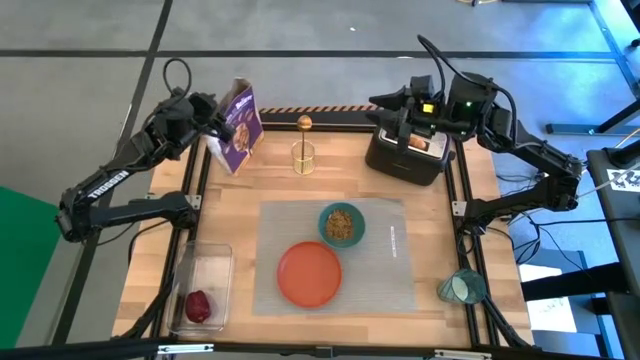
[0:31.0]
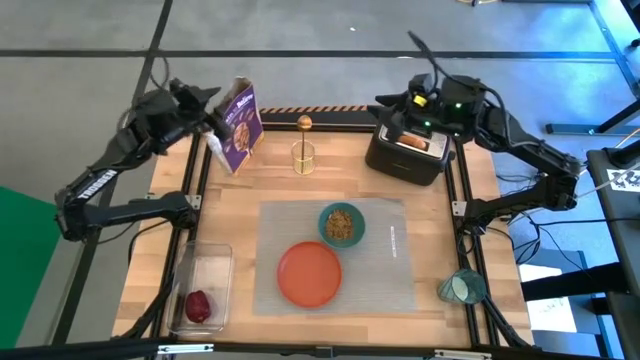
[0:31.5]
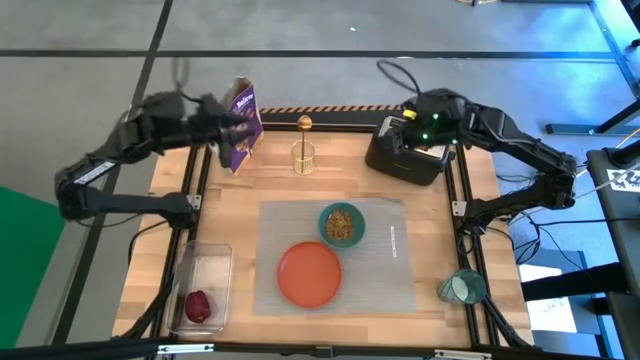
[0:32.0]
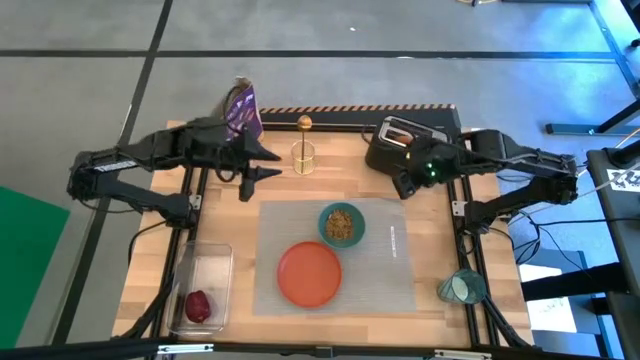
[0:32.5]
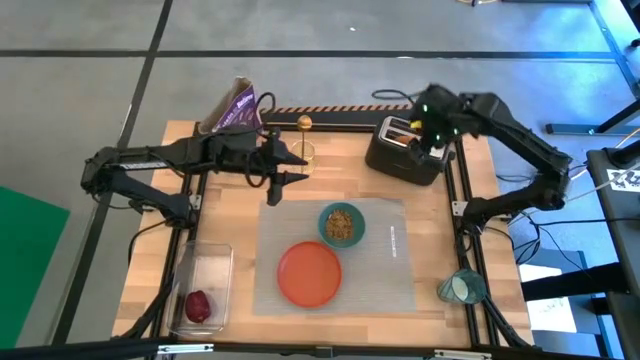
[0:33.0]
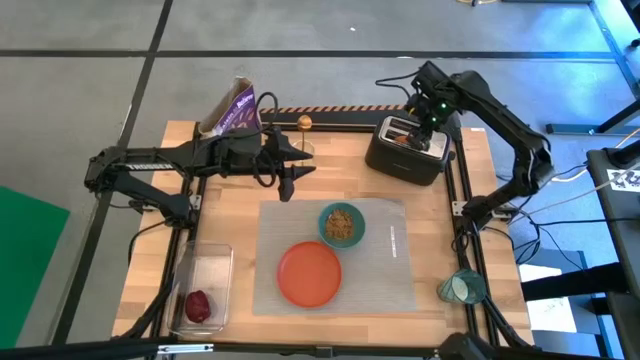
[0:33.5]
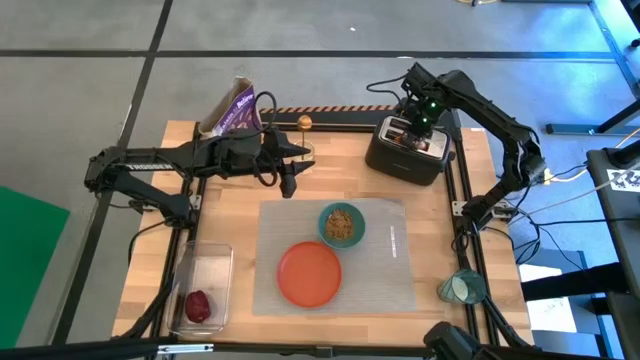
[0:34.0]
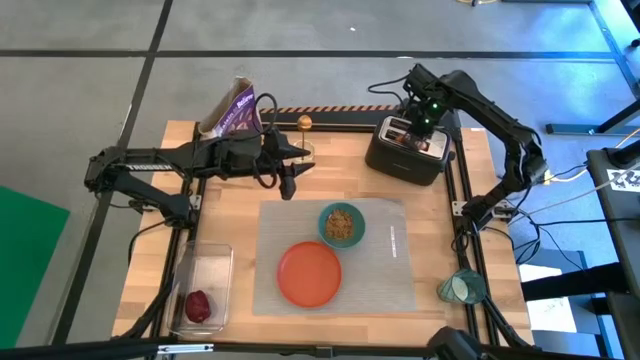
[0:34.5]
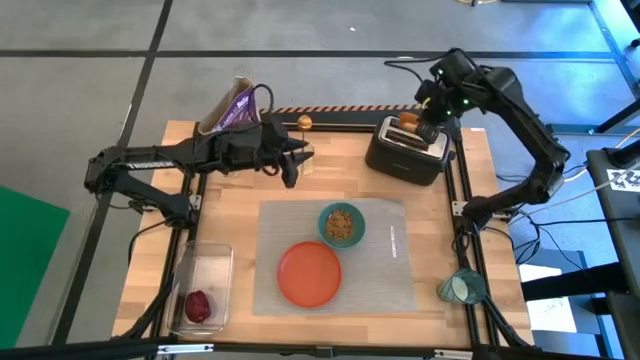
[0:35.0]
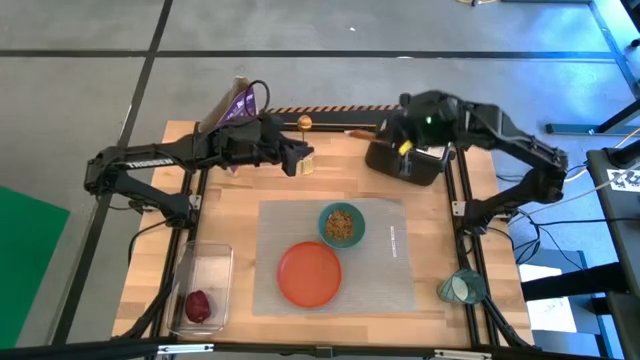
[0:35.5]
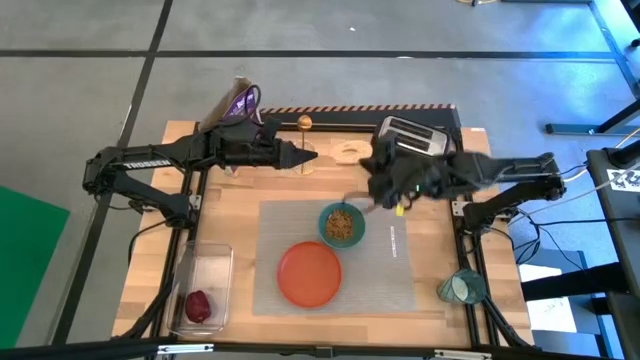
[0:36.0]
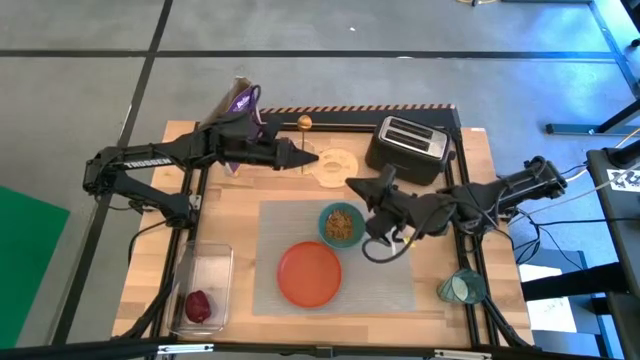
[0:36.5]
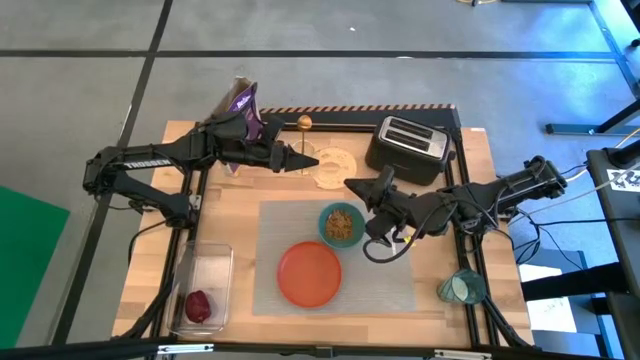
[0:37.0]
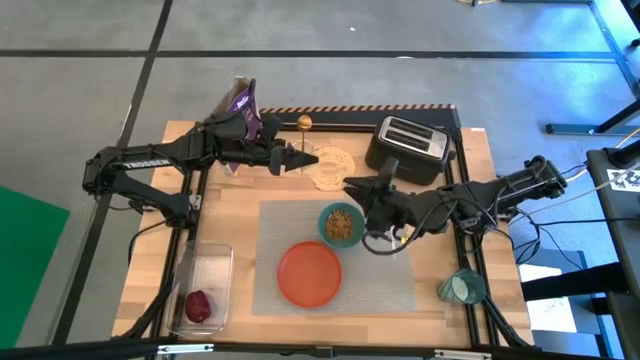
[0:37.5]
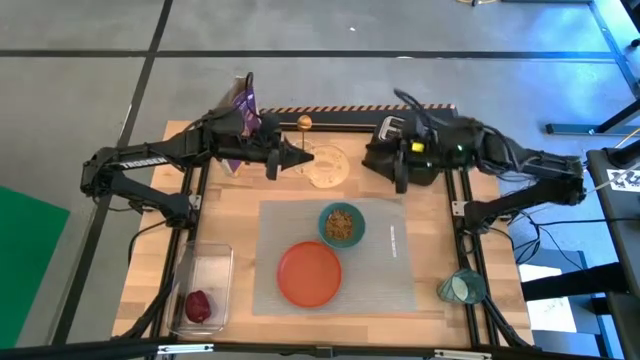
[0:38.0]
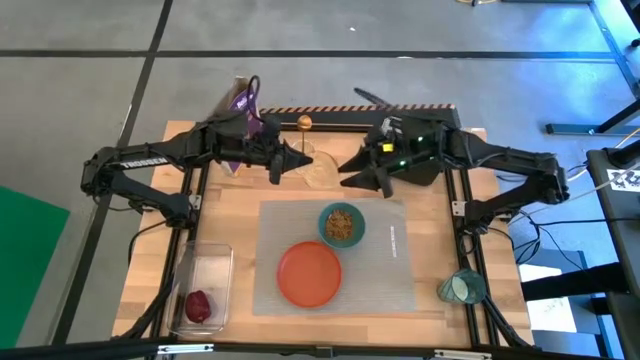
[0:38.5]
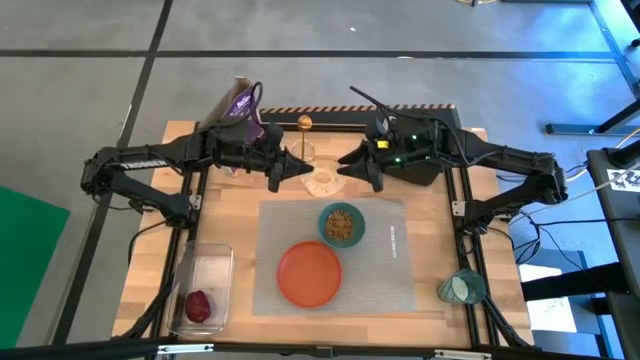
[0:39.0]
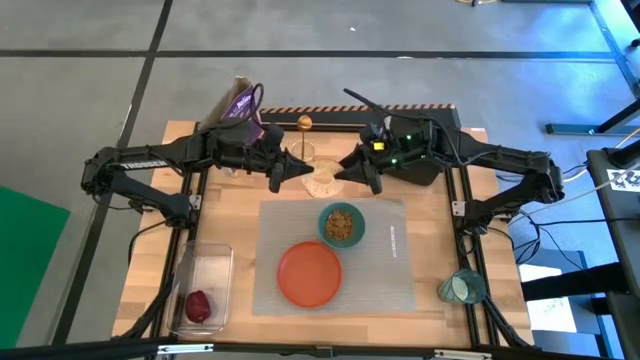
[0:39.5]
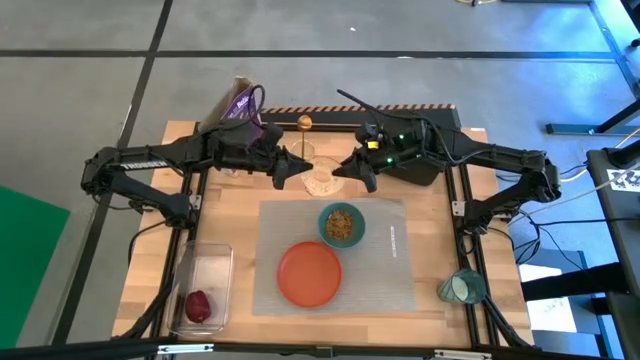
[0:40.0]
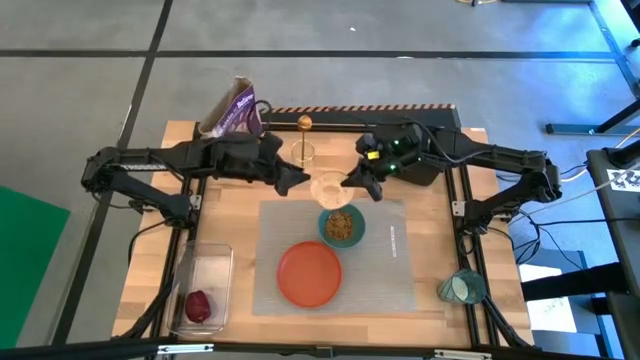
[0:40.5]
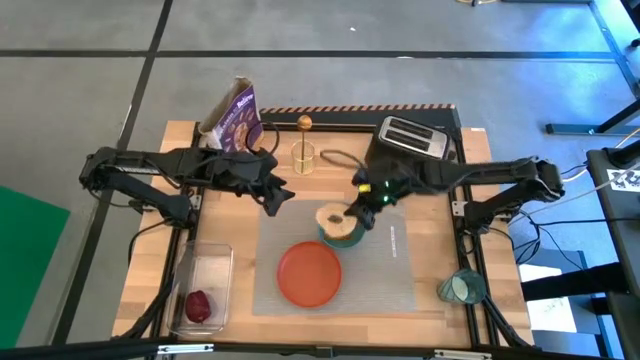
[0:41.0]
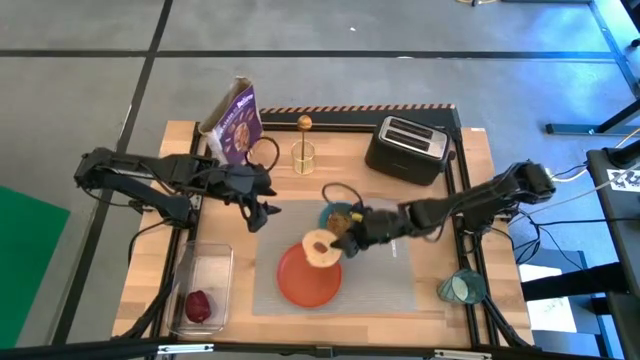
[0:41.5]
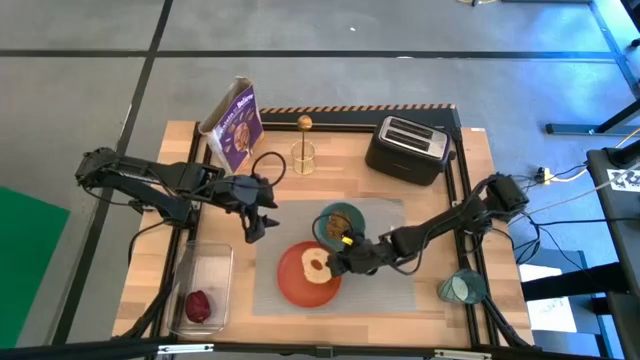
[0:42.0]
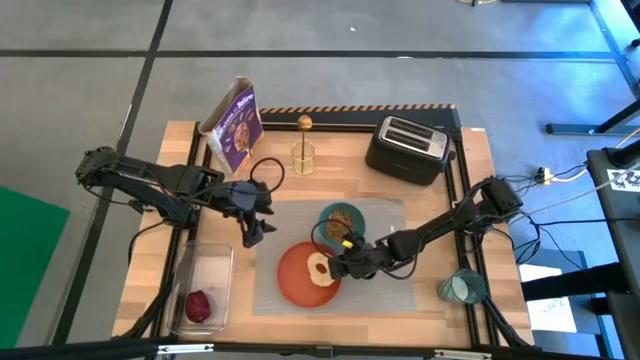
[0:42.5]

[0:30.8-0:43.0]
Task: Arrange a breakfast setting
Put the toasted bagel on the orange plate

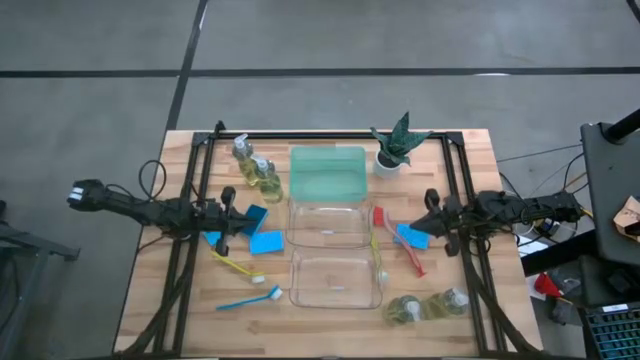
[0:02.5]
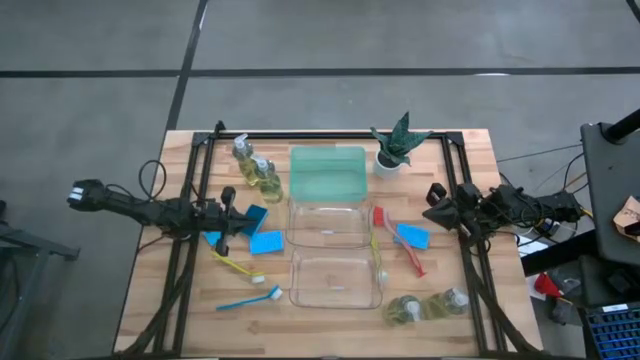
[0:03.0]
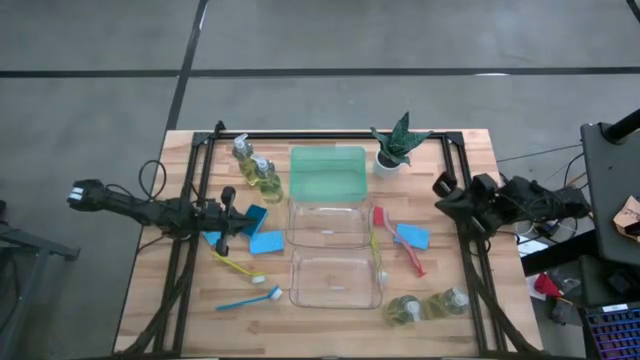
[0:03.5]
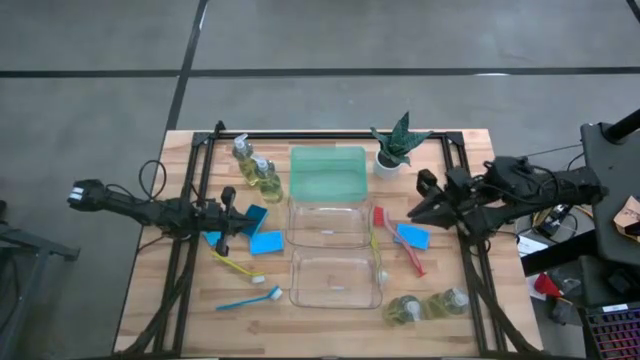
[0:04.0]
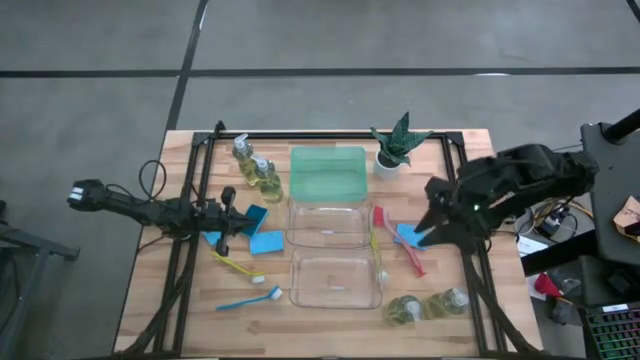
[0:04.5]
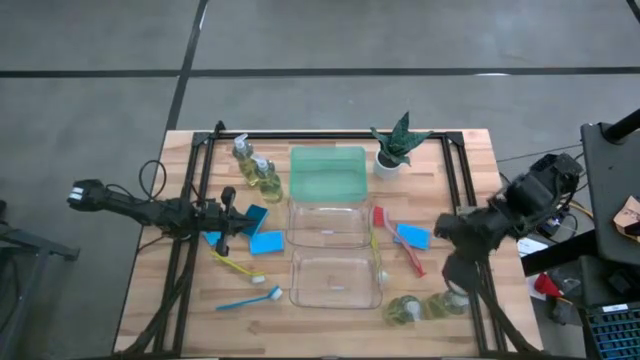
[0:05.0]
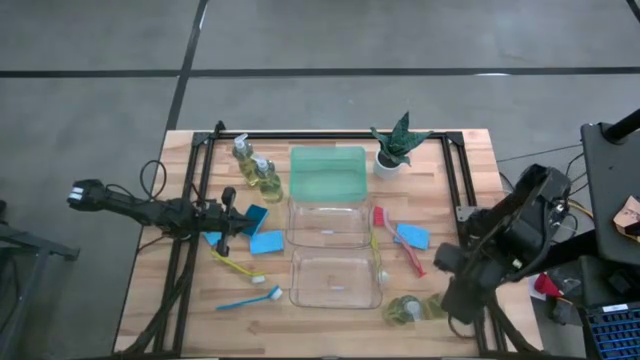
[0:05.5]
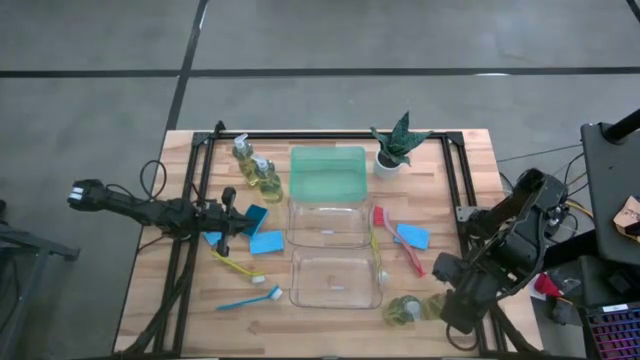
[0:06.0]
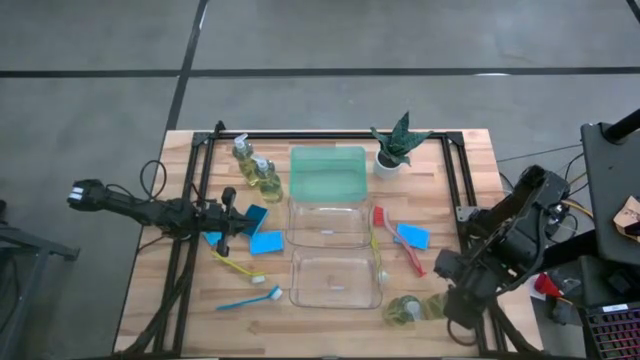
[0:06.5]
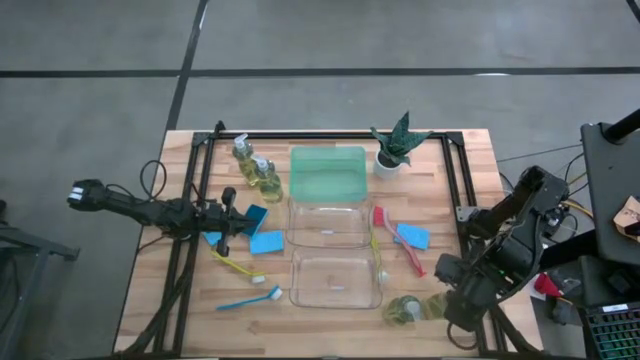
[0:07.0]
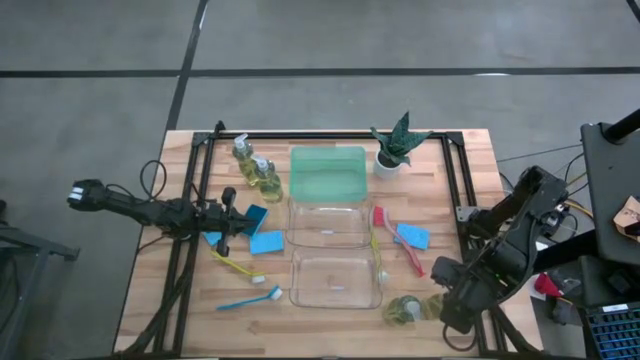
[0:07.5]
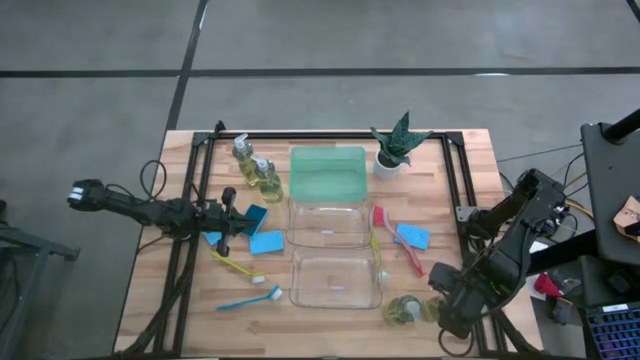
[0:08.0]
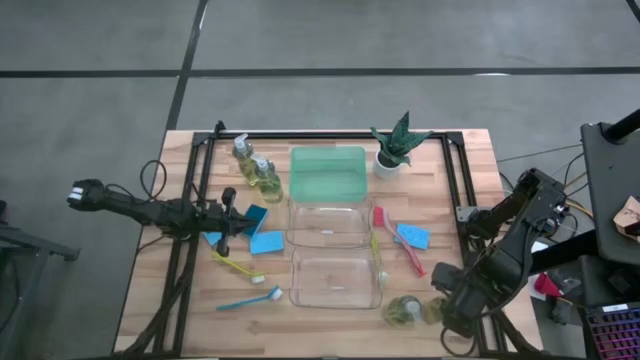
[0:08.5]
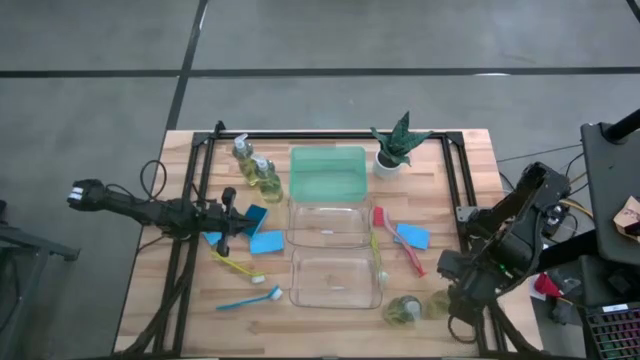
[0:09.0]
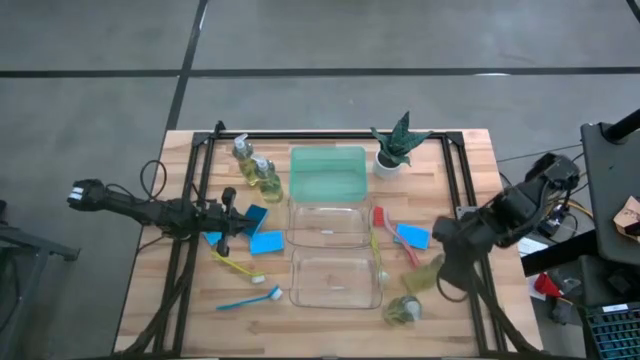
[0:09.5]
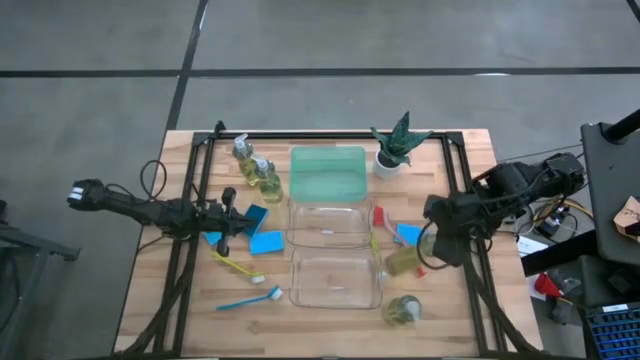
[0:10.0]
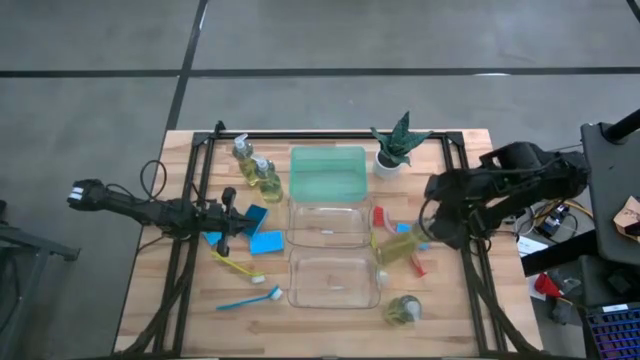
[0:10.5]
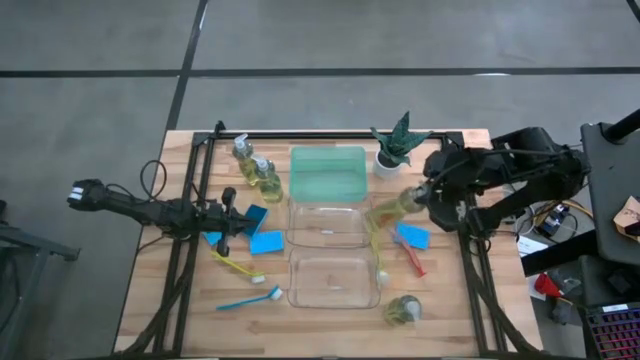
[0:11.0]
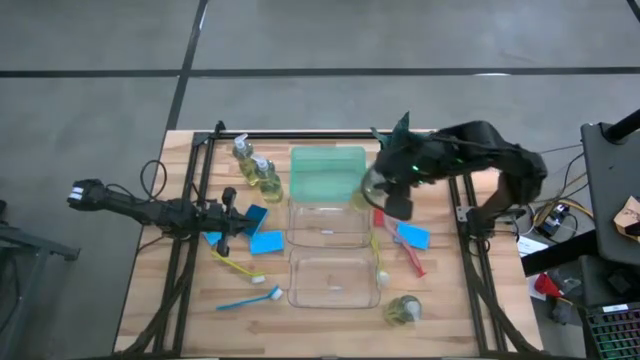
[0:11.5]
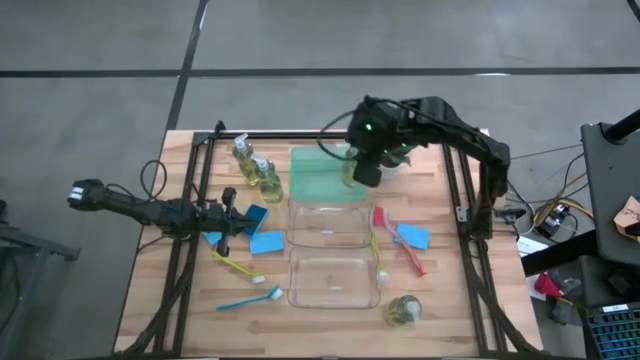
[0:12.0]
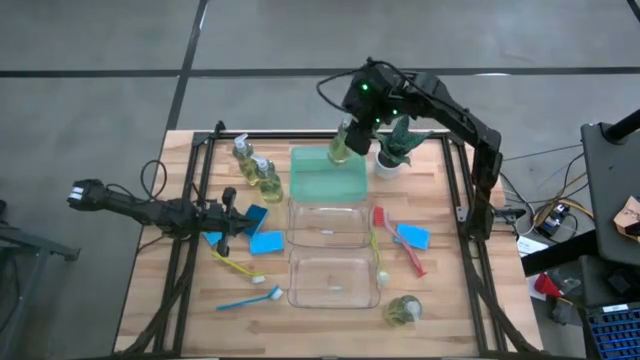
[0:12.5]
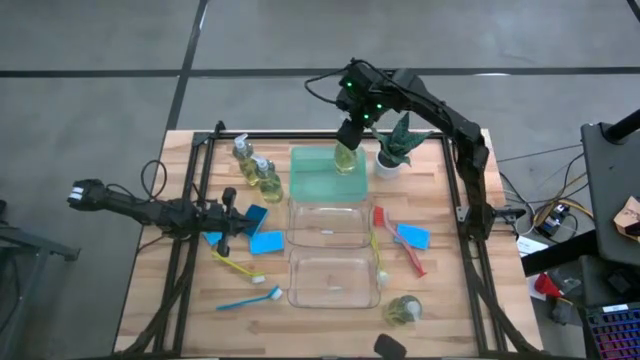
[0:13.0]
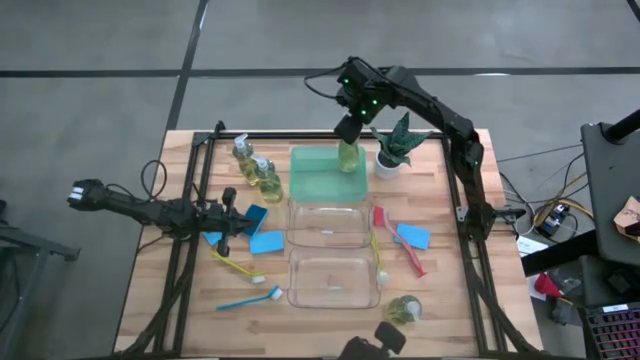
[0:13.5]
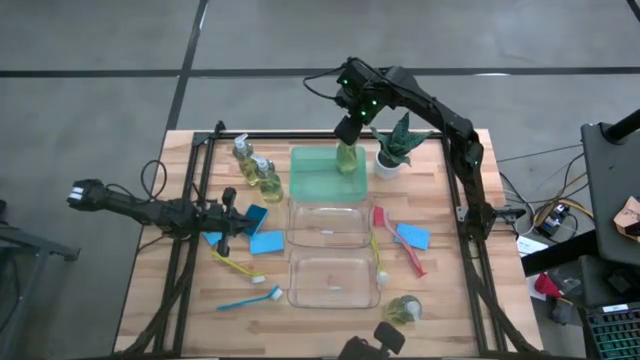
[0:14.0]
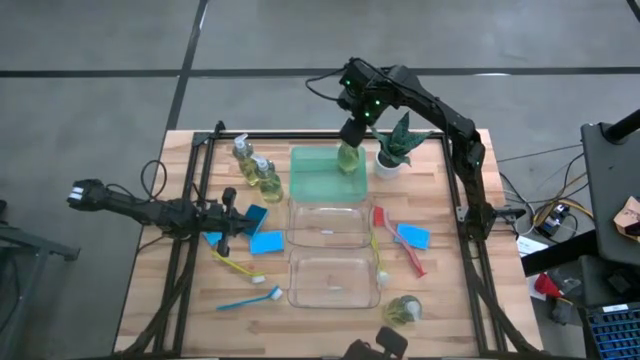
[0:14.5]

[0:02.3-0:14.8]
Task: Pick & Place Kitchen Sink Supplies
Put the transparent soap dispenser into the blue bin
